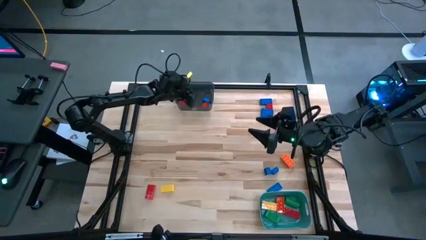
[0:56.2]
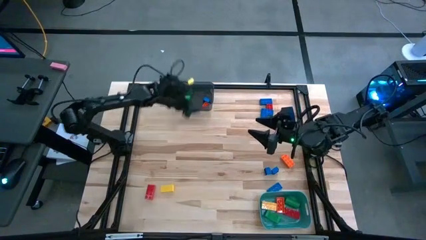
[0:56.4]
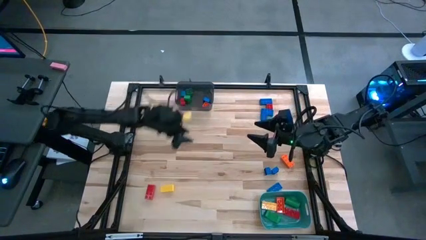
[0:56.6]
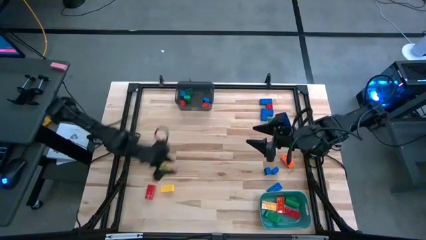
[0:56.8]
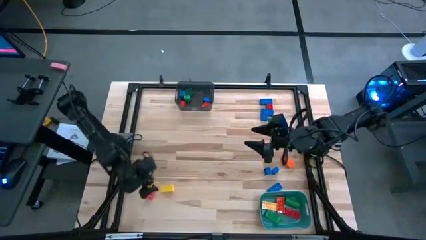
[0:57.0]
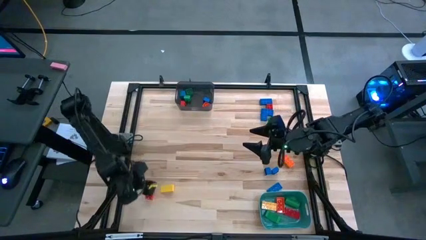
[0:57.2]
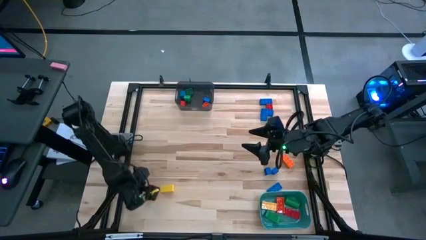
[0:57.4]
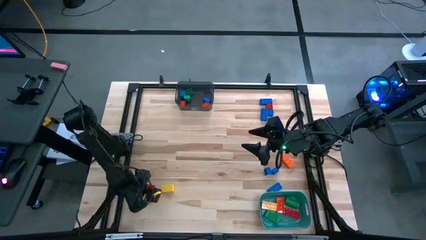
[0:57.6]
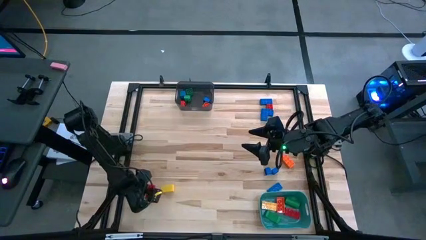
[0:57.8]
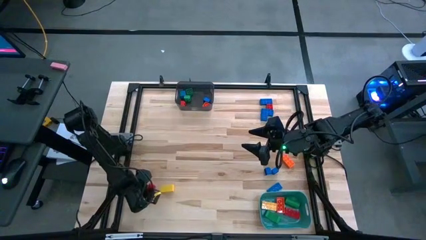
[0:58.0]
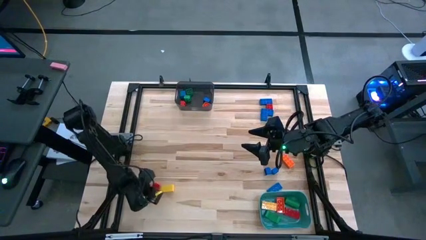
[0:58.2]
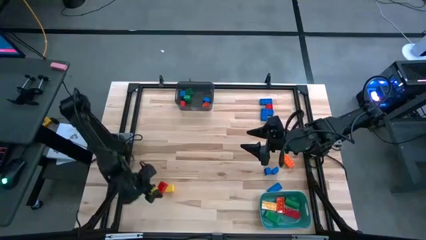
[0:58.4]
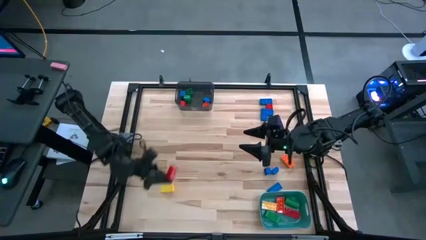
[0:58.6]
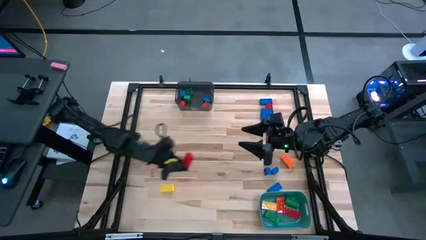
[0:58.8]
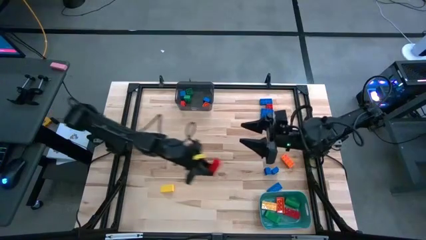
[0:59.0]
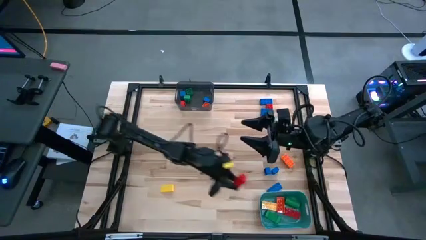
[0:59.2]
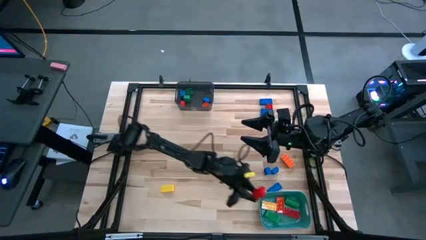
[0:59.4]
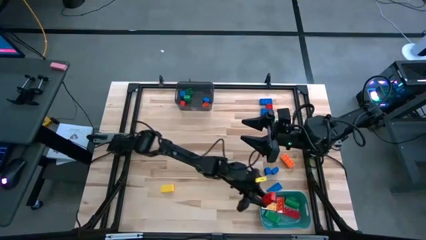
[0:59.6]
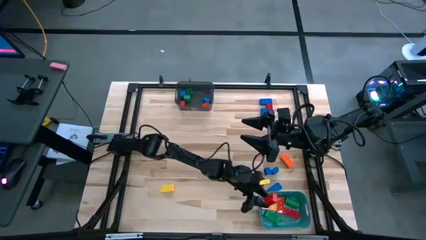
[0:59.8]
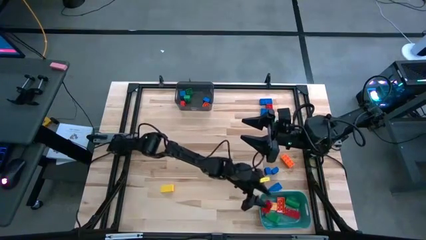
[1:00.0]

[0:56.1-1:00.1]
Task: Sort blocks by size
Put the red game piece into the green bin

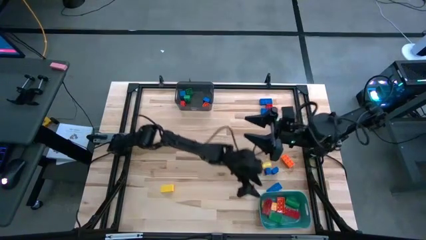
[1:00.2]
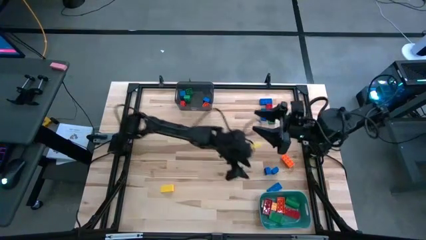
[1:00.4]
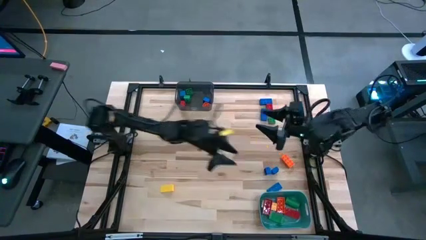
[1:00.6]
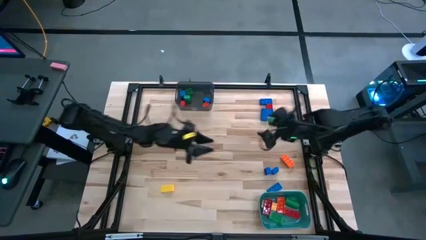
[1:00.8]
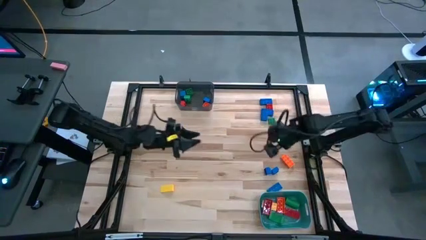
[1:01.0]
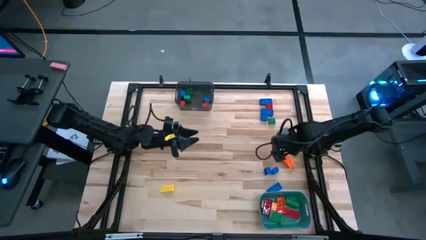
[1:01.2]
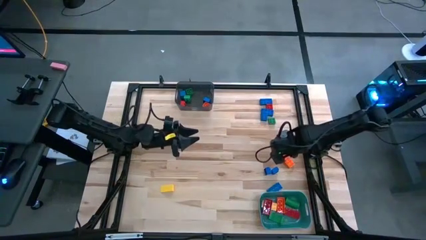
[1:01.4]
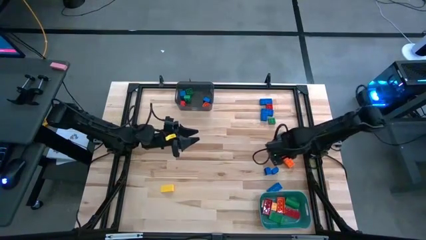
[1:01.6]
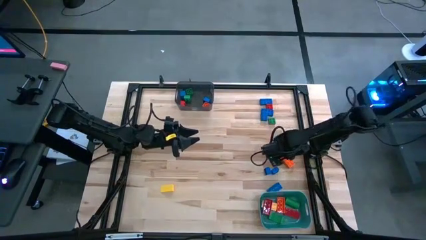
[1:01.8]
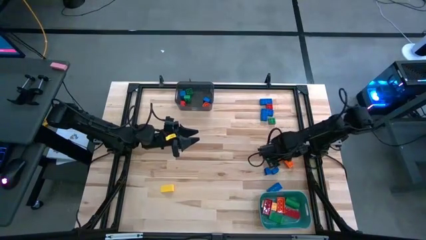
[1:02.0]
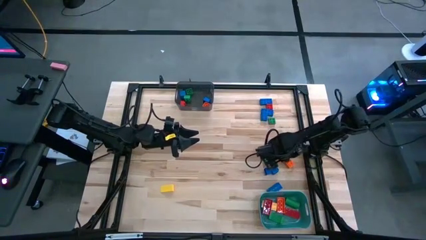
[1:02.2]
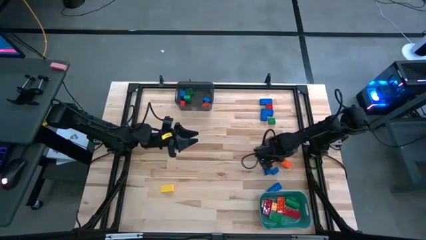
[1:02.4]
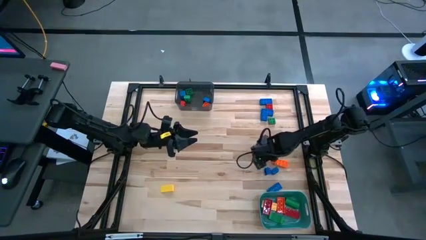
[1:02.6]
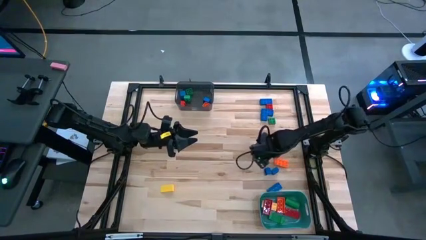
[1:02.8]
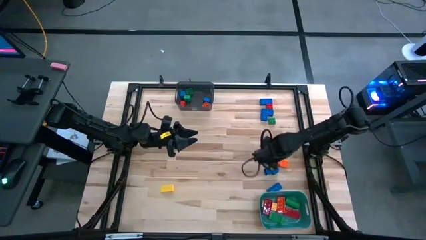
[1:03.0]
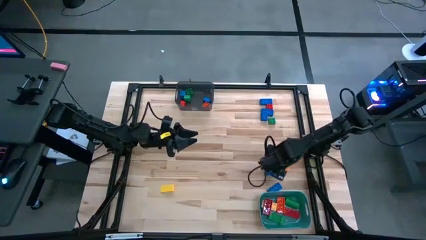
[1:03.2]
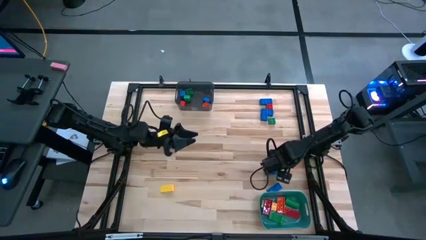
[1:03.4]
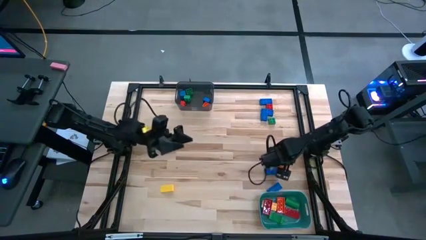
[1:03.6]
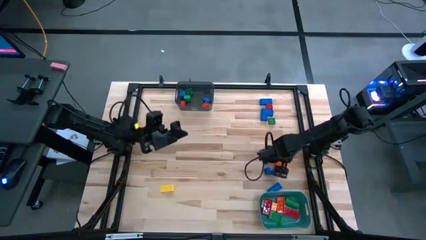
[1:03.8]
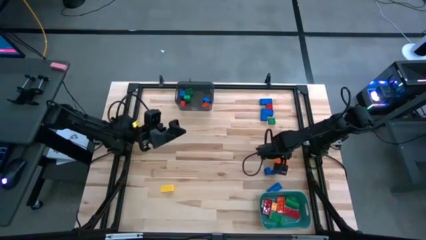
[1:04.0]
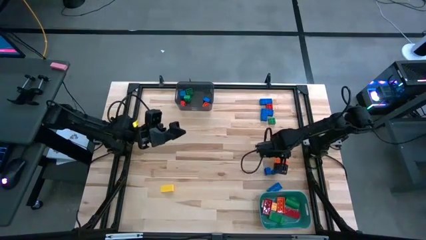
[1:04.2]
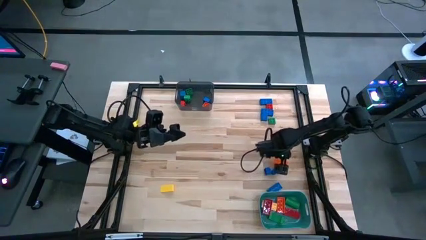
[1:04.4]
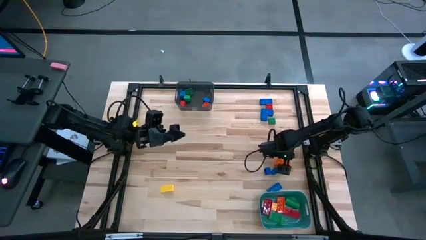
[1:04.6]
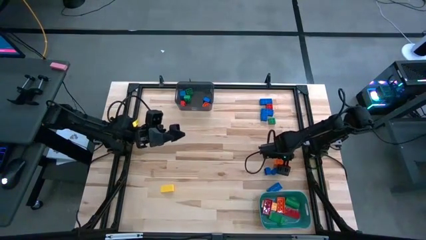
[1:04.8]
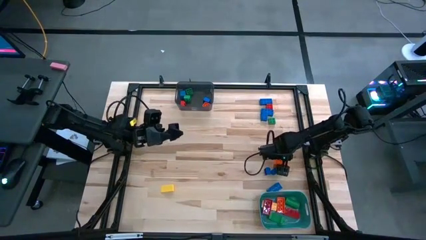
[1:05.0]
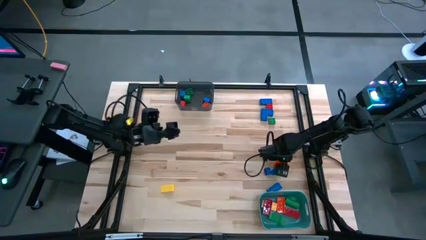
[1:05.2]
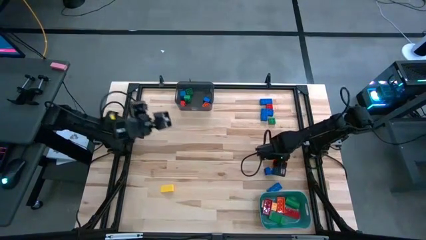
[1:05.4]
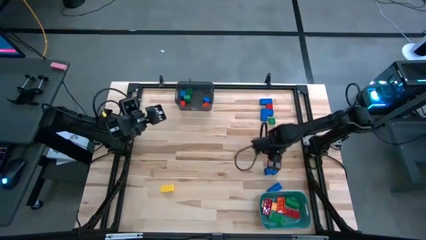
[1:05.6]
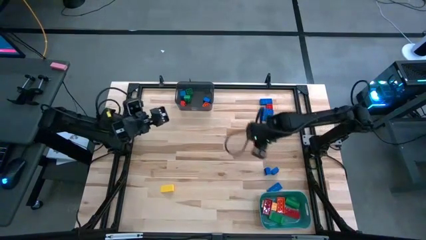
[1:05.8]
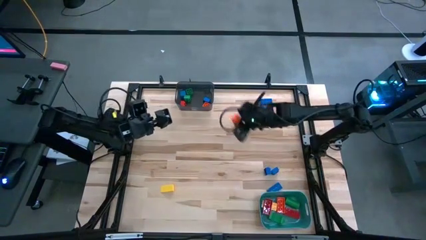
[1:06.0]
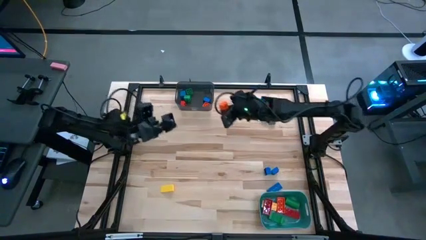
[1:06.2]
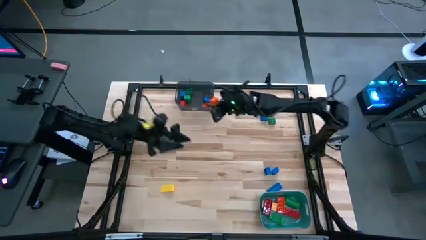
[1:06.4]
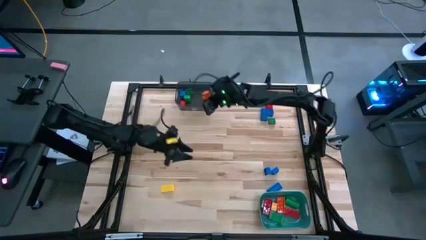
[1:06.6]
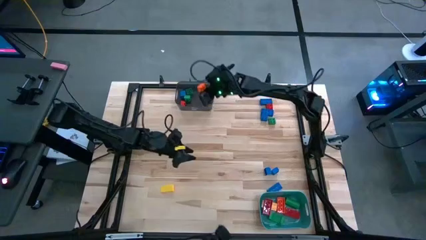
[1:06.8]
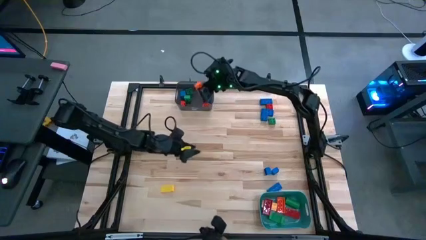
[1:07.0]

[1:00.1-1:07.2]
Put the orange game piece into the black bin

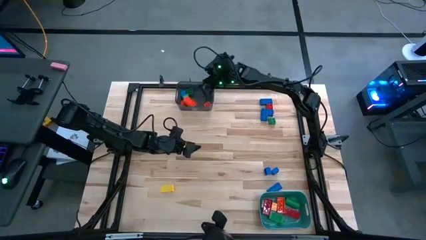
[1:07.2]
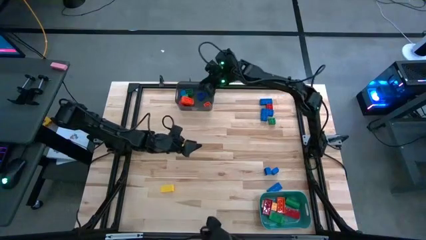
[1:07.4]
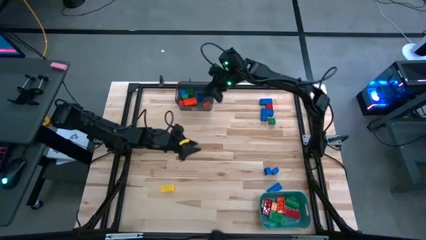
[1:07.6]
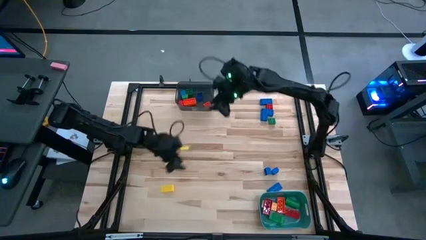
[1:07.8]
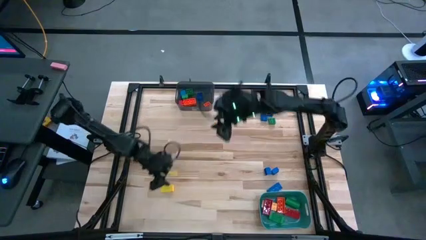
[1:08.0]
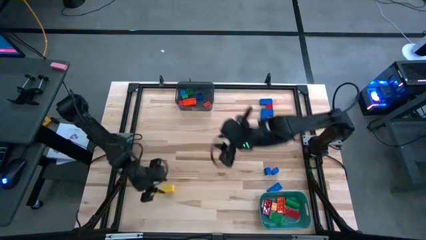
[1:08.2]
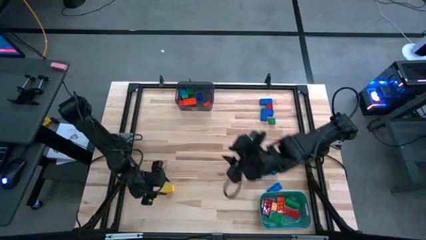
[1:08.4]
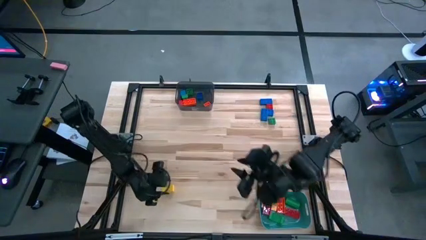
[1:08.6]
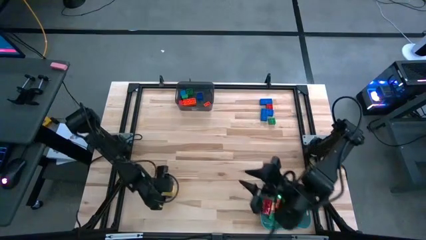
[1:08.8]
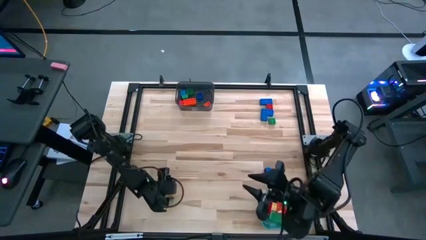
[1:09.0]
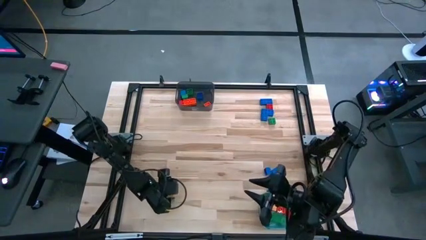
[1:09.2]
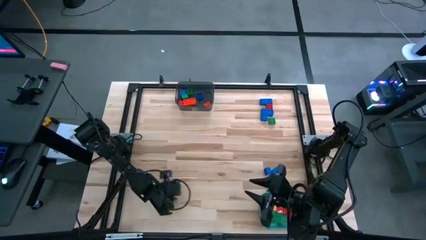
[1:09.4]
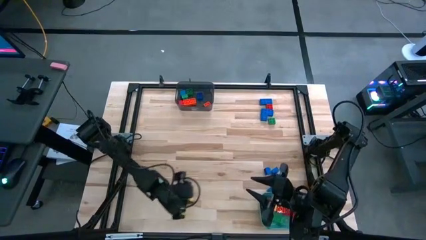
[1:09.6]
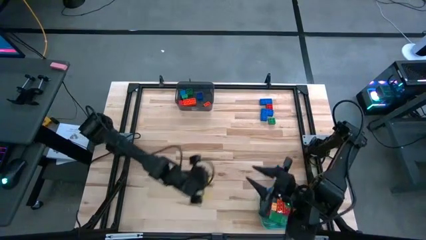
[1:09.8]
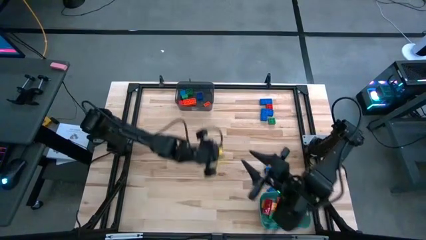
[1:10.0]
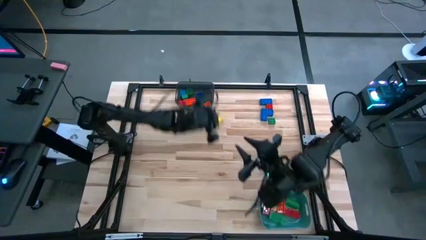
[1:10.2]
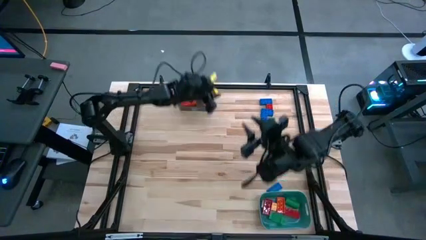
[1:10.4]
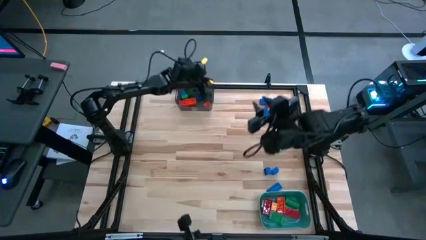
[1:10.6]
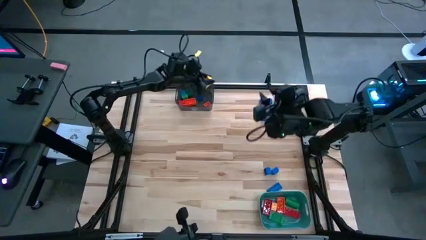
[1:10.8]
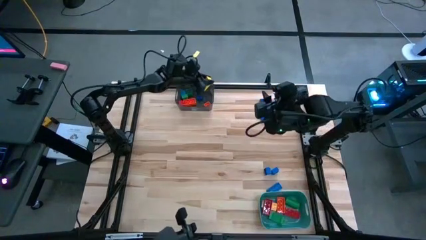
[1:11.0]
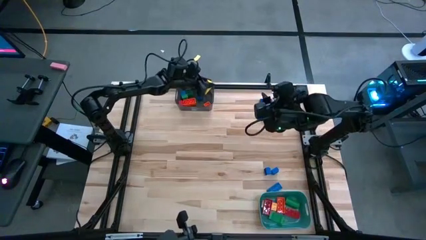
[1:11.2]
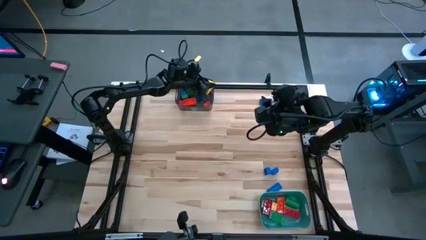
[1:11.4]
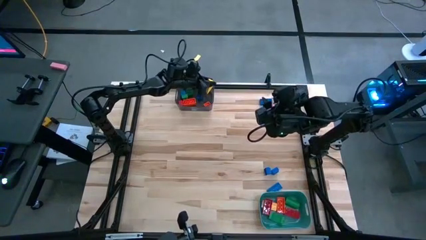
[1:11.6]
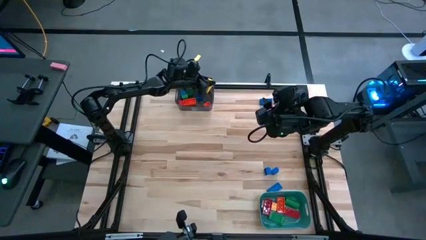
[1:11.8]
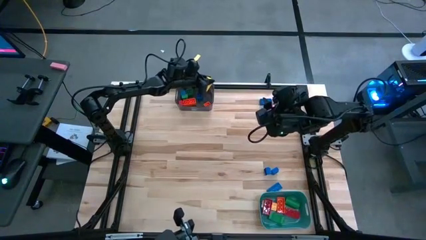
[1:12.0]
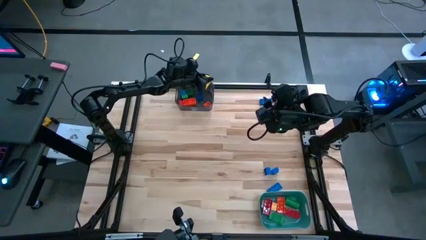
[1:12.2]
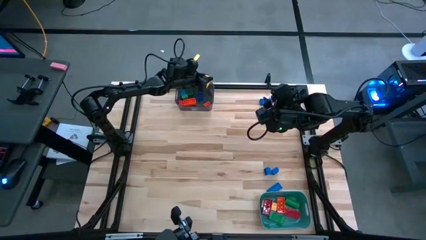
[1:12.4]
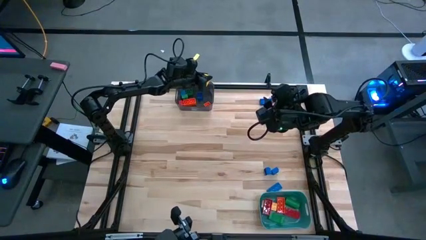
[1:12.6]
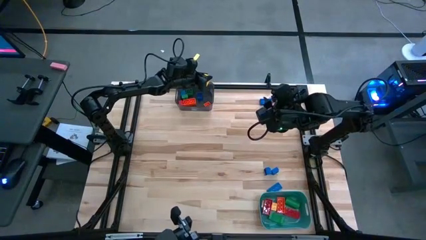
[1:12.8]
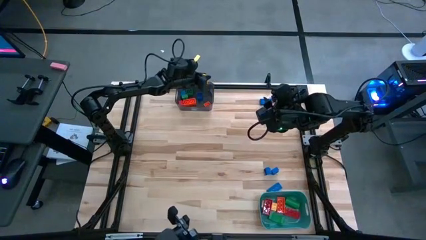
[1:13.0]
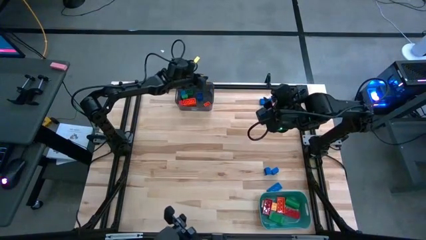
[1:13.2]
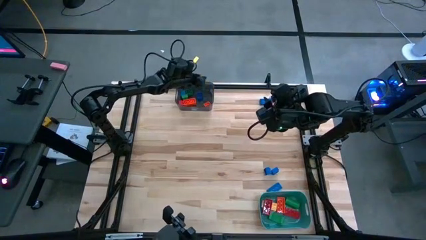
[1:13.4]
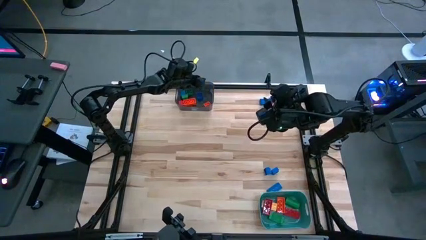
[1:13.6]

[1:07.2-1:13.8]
Put the yellow game piece into the black bin
